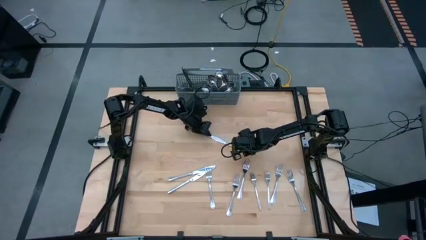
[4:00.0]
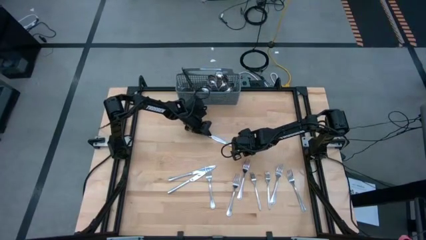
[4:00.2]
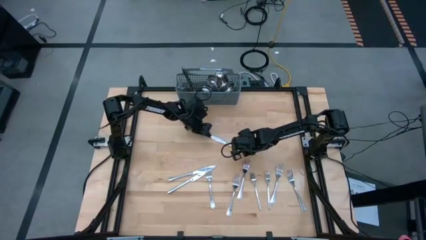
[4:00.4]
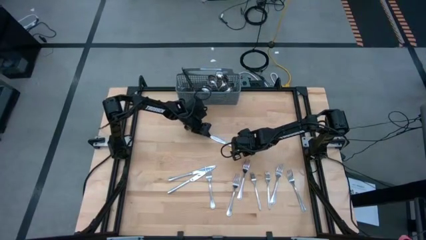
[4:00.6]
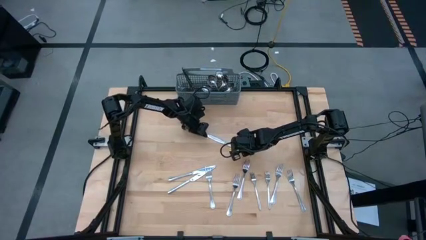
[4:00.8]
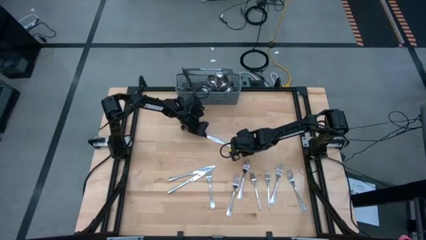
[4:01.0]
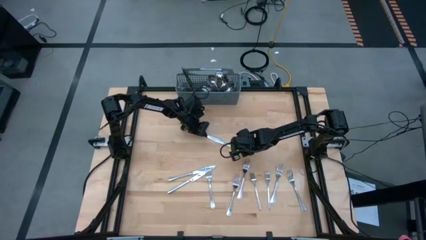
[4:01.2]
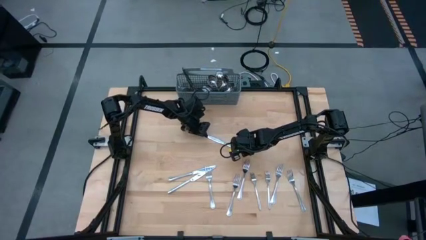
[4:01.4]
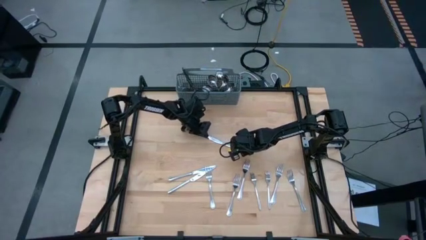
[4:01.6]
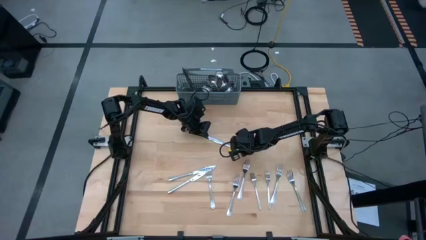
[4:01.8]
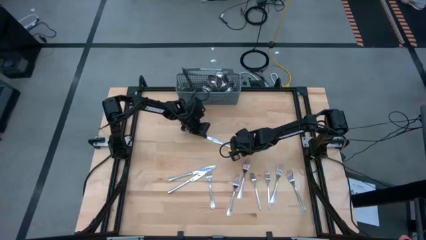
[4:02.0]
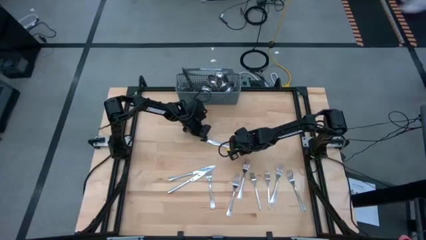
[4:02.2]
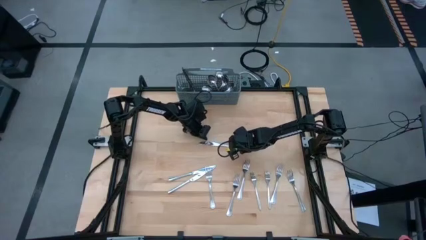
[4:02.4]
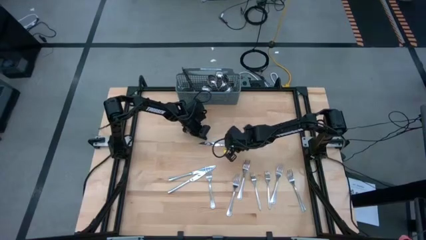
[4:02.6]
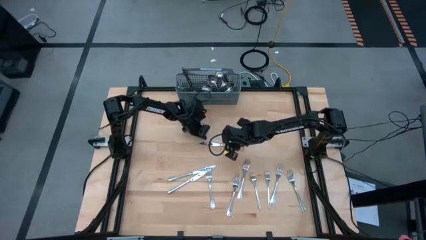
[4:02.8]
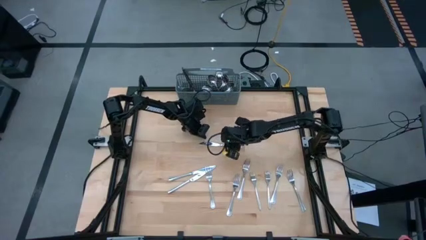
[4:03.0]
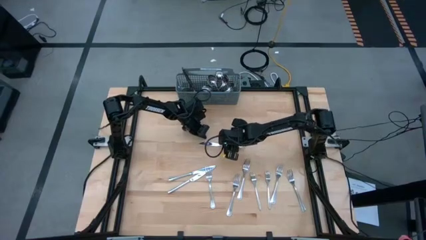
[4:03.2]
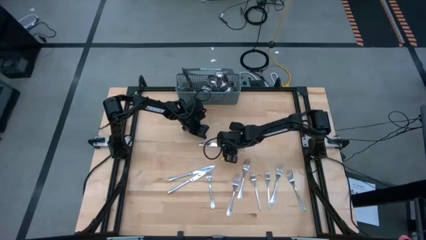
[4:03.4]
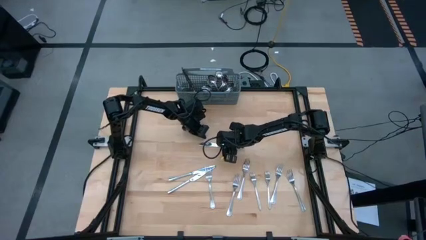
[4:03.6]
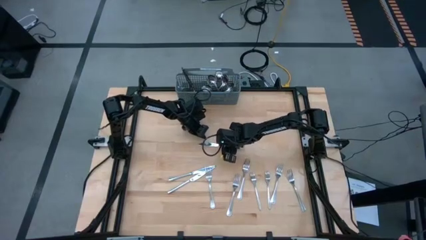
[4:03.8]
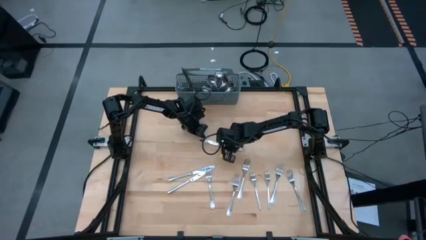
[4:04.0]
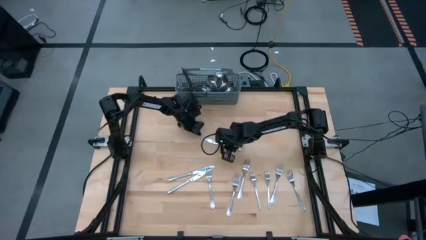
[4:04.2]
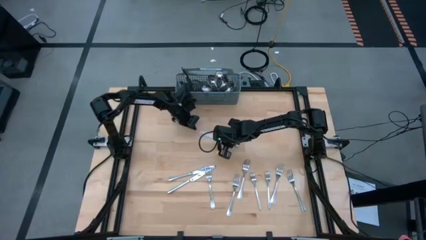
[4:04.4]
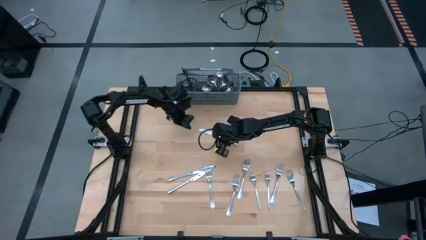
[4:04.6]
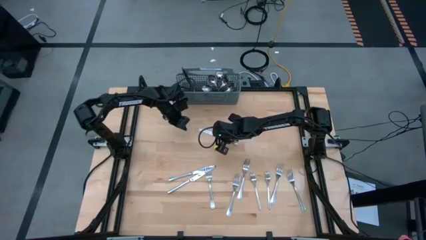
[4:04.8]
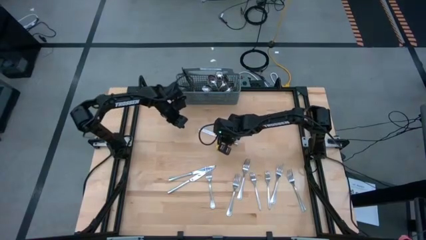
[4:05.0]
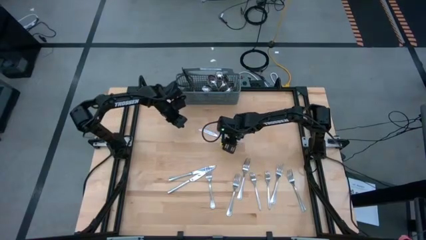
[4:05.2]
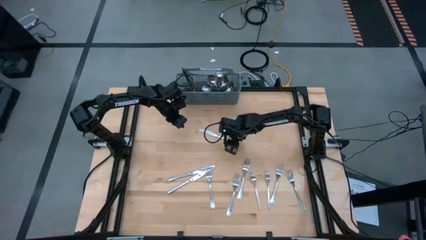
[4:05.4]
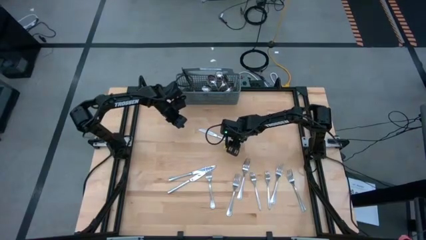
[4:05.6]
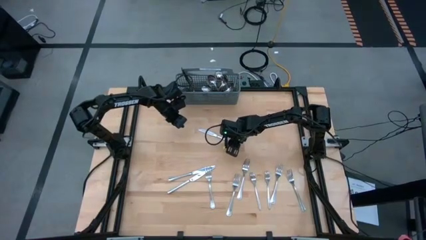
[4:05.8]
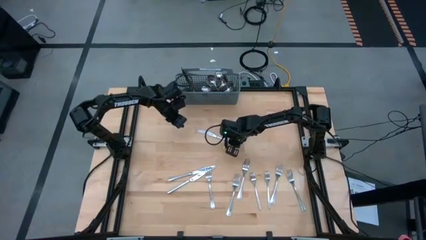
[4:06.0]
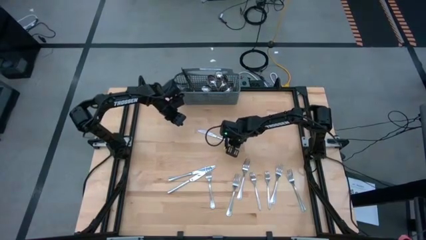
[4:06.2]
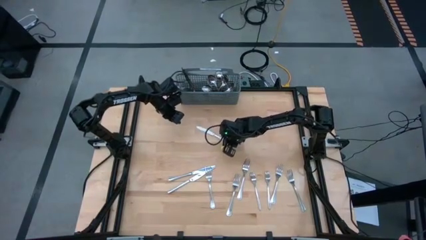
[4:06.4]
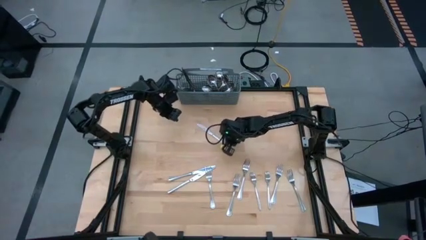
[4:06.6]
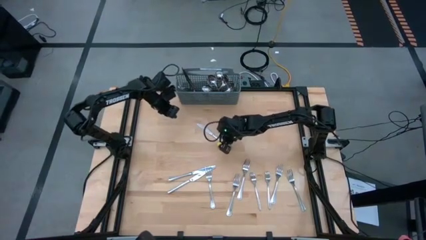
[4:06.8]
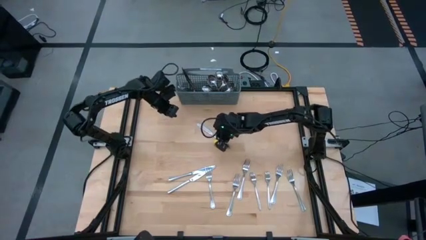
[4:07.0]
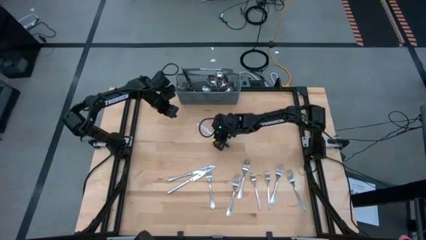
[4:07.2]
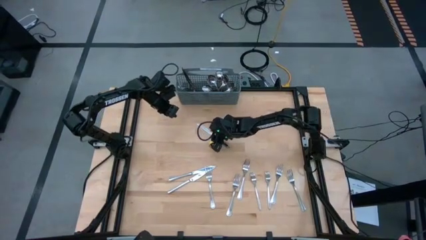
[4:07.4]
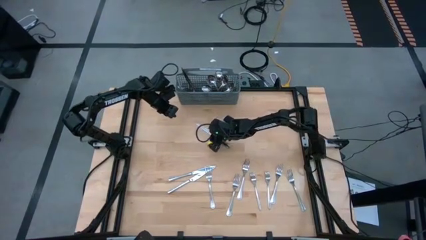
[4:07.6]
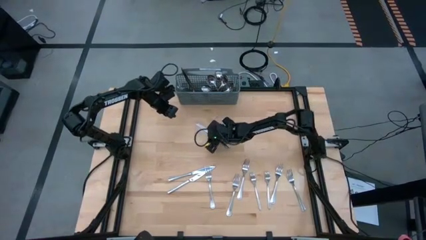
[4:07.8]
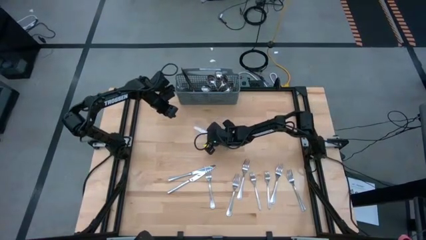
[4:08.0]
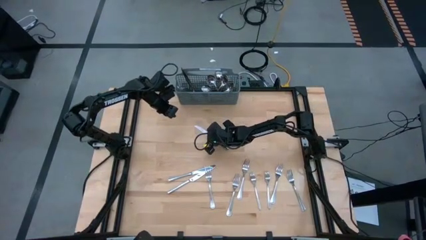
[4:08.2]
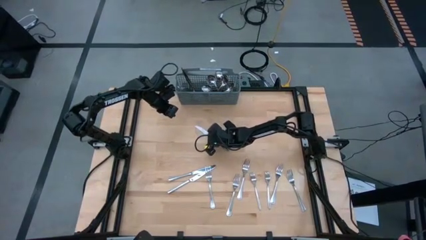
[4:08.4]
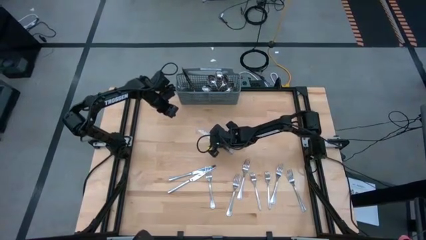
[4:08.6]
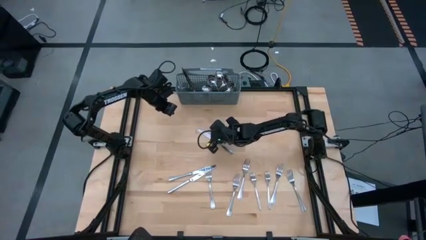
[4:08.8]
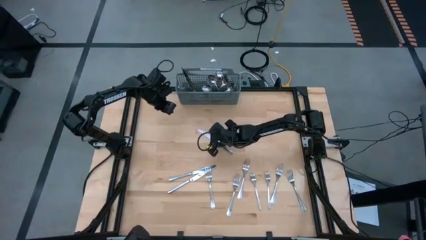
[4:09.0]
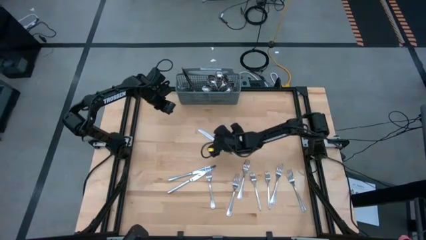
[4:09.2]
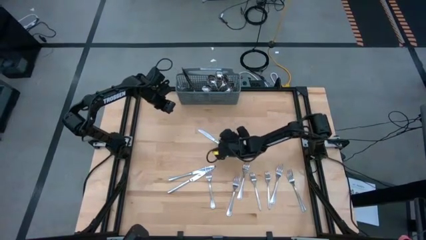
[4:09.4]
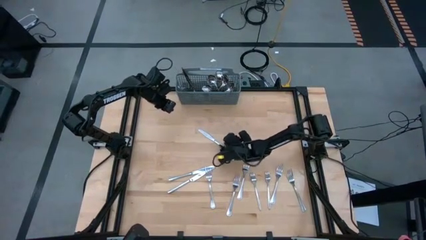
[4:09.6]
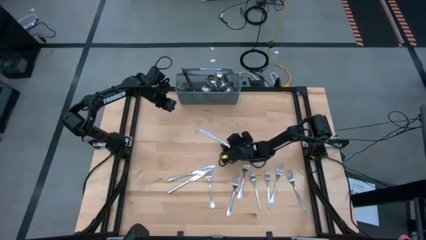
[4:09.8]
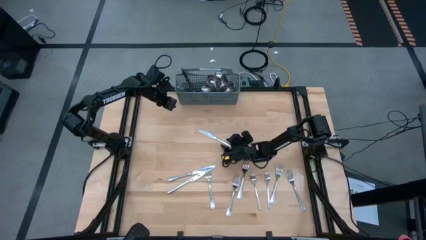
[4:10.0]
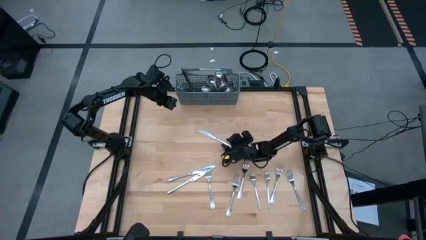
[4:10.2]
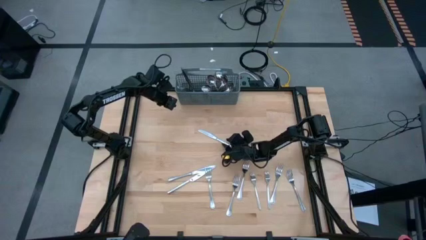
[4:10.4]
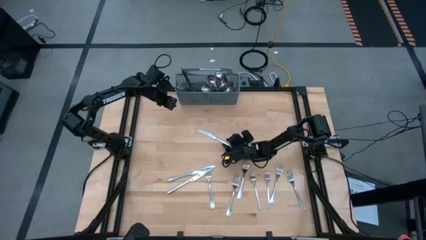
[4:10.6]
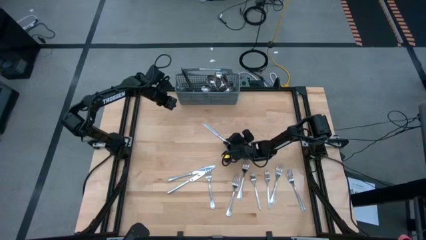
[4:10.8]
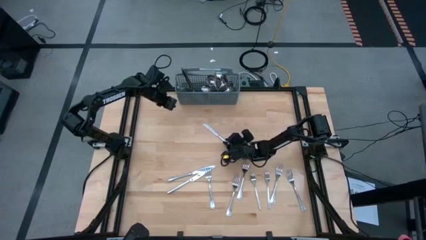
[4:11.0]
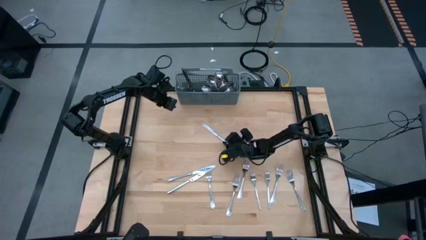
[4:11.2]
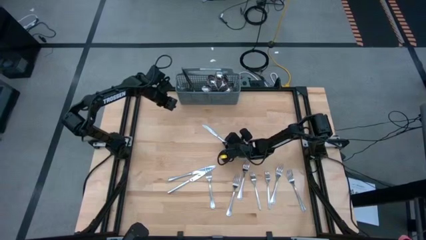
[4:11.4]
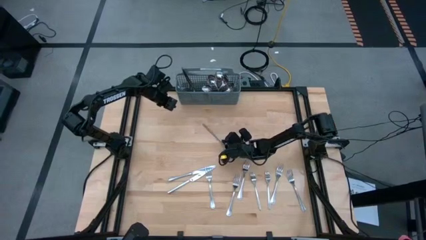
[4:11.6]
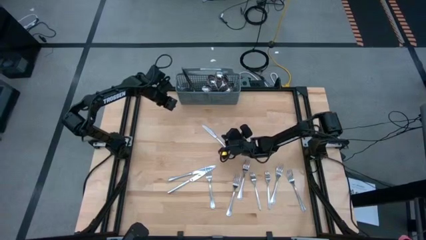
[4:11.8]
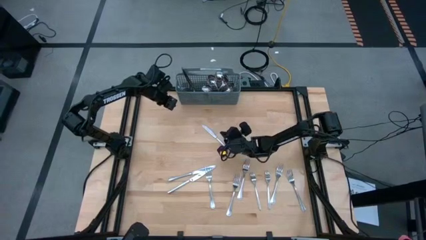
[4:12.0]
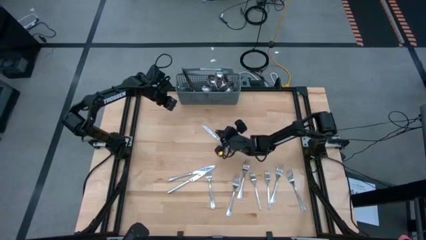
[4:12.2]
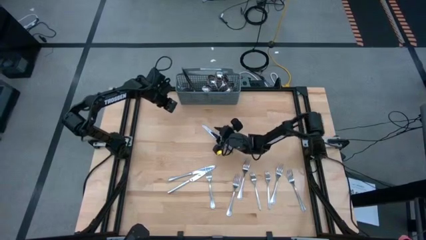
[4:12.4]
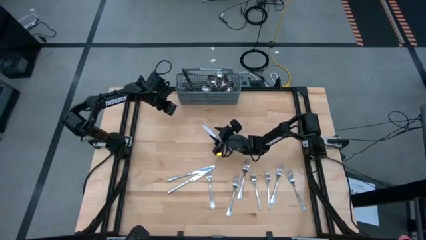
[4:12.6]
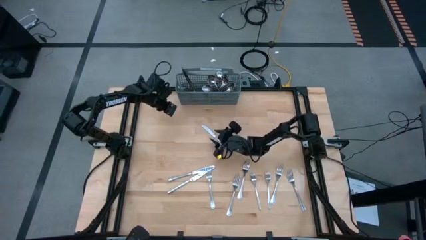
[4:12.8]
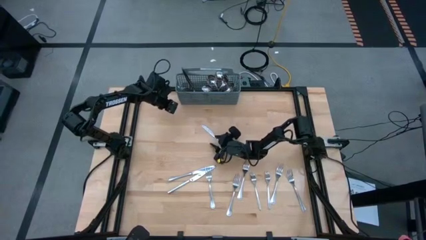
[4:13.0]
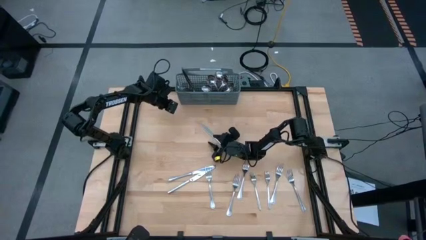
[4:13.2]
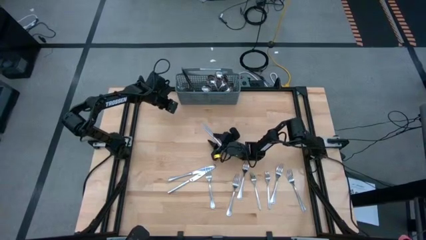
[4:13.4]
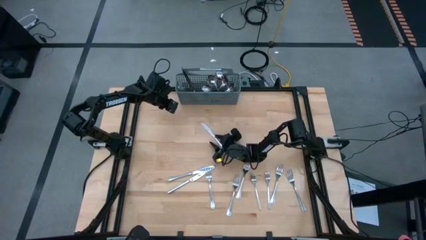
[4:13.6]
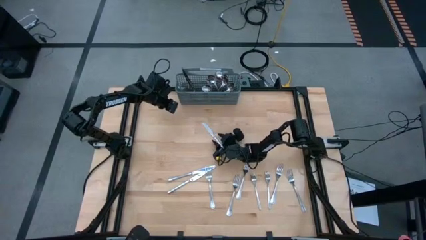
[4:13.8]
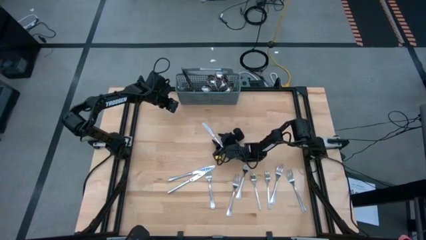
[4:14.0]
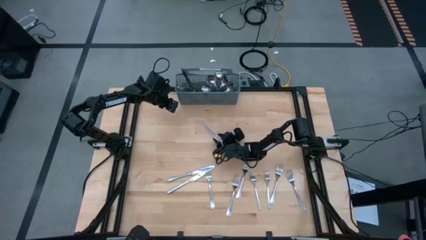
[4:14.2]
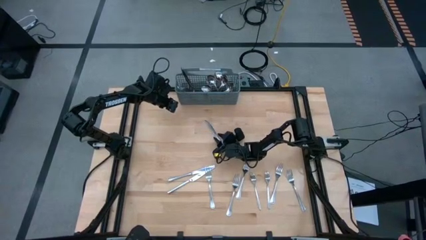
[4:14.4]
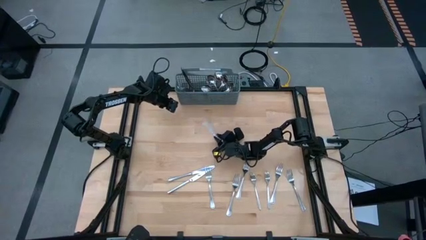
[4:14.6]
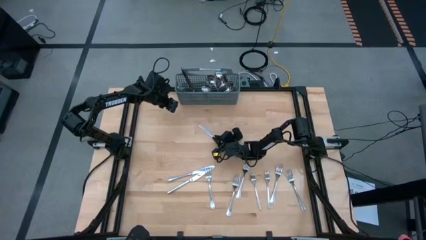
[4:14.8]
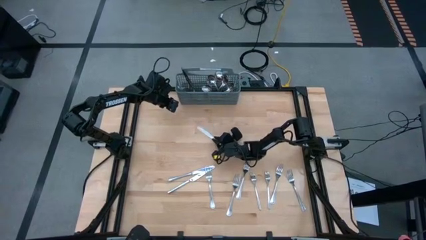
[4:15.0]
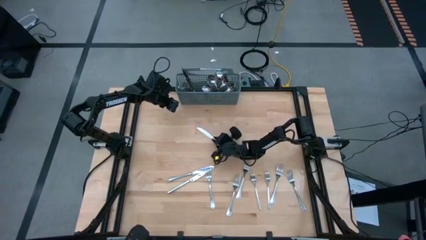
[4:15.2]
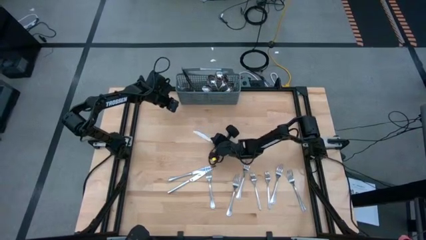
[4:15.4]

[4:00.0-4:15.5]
Task: Sort silverware
Put the silver knife into the gray utensil holder
